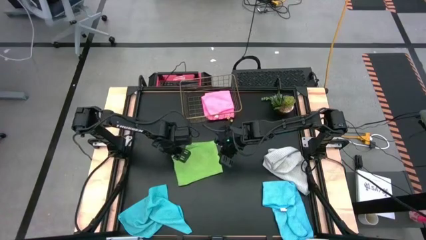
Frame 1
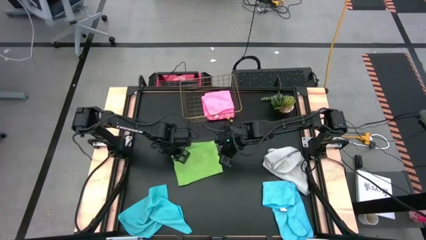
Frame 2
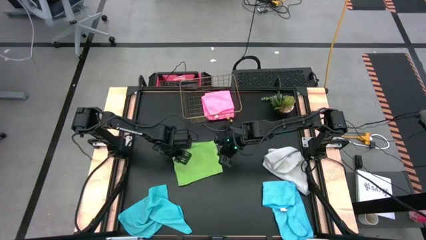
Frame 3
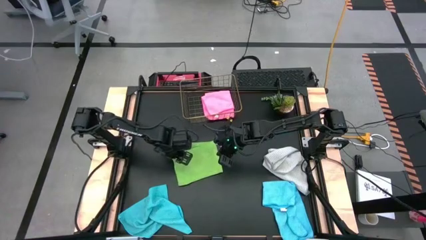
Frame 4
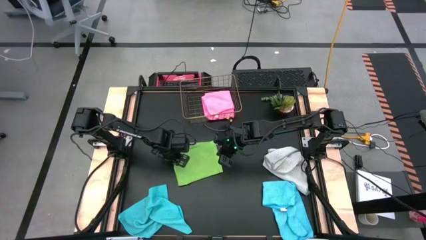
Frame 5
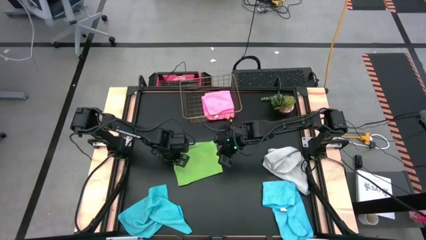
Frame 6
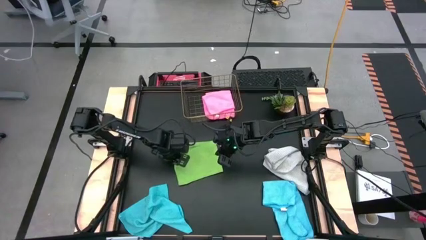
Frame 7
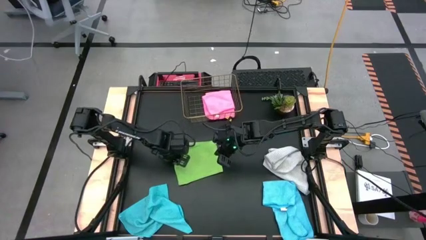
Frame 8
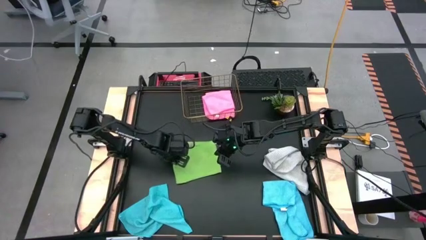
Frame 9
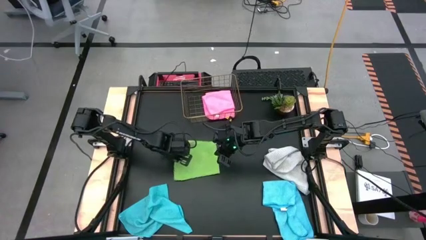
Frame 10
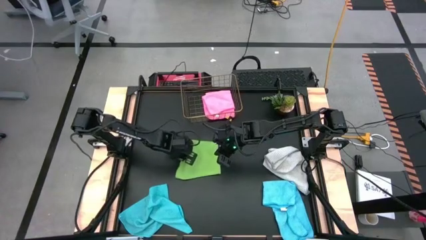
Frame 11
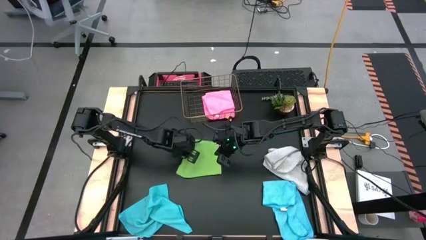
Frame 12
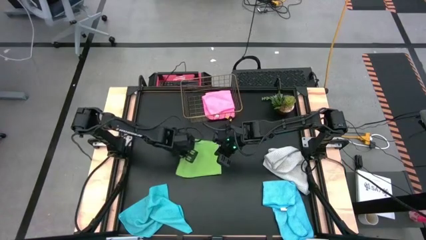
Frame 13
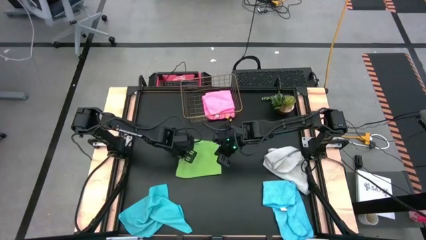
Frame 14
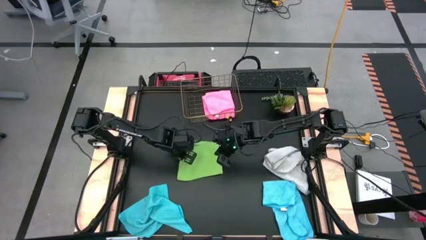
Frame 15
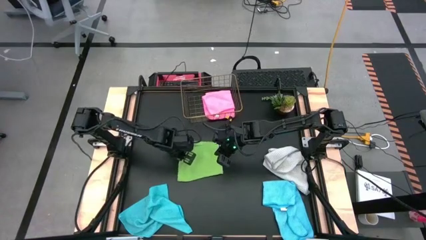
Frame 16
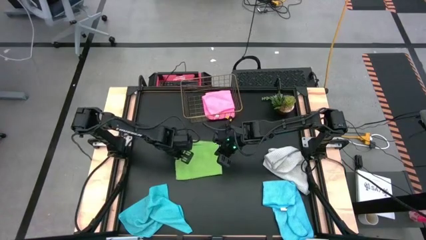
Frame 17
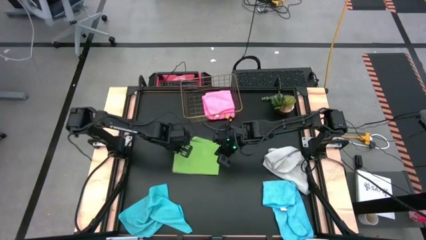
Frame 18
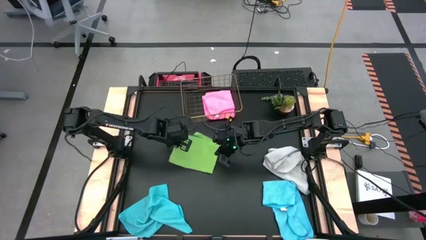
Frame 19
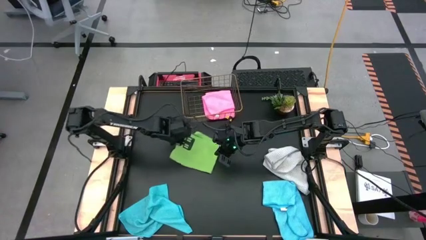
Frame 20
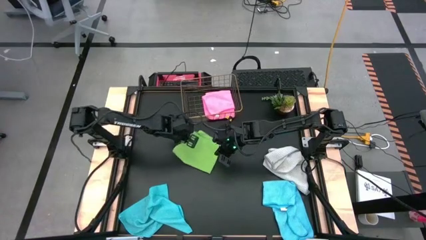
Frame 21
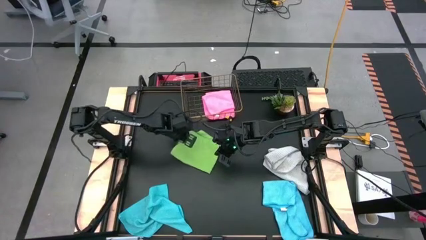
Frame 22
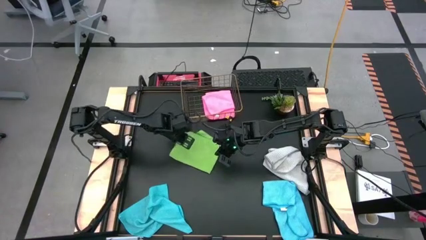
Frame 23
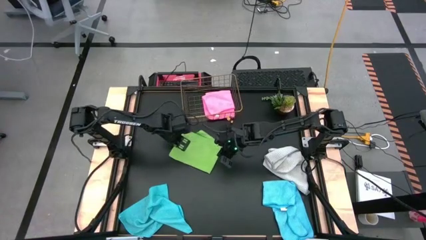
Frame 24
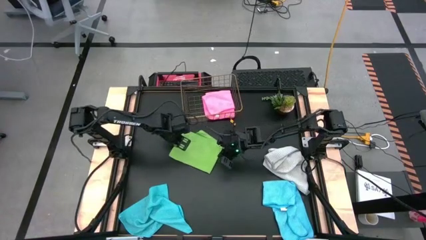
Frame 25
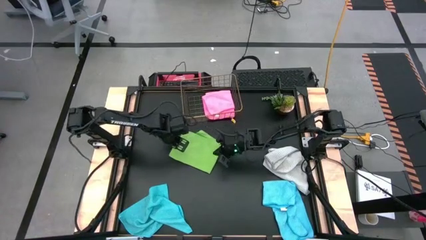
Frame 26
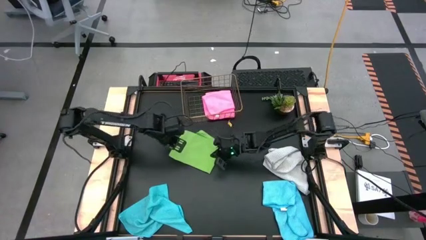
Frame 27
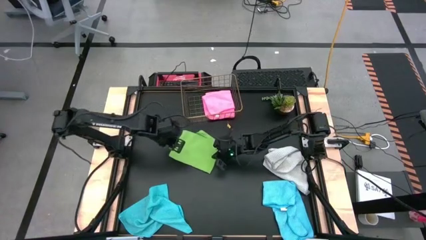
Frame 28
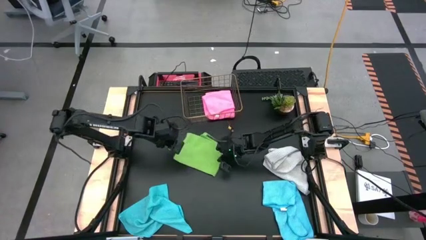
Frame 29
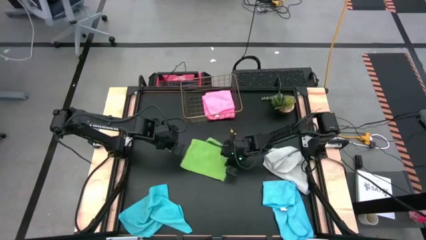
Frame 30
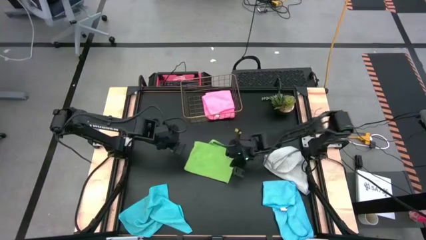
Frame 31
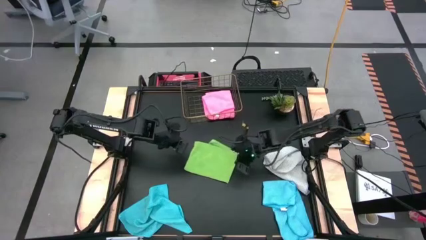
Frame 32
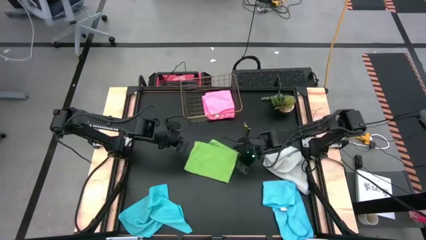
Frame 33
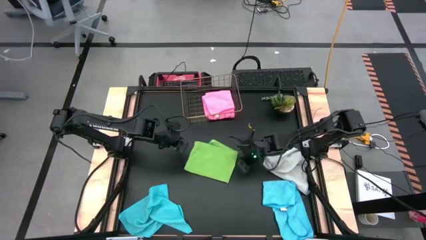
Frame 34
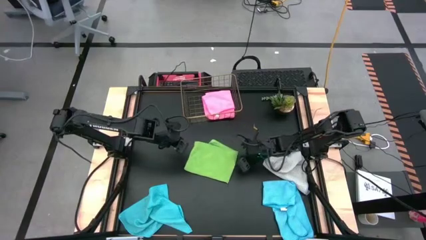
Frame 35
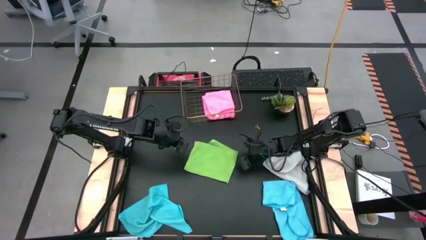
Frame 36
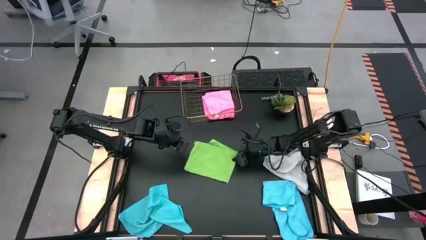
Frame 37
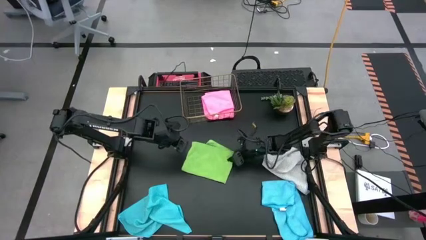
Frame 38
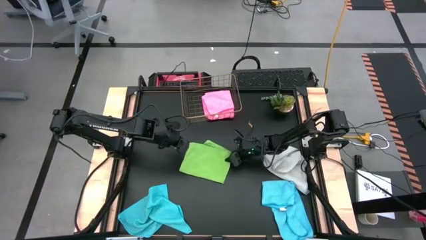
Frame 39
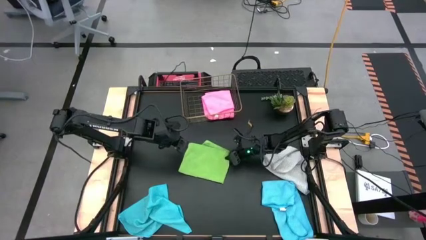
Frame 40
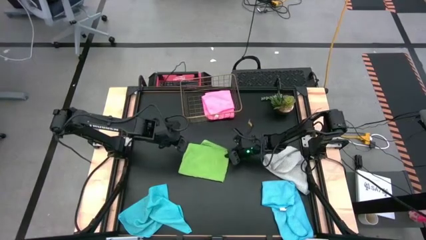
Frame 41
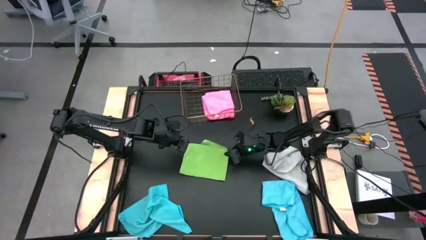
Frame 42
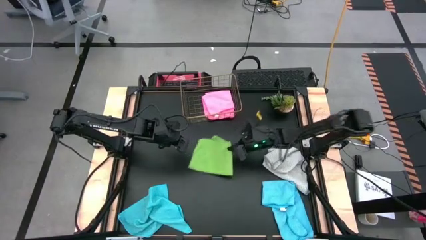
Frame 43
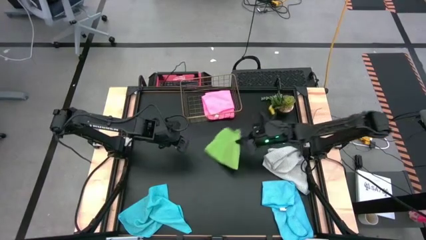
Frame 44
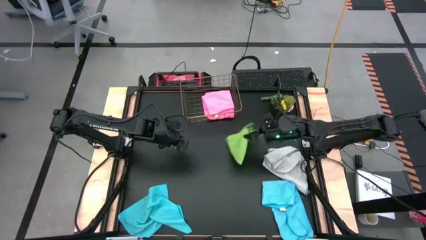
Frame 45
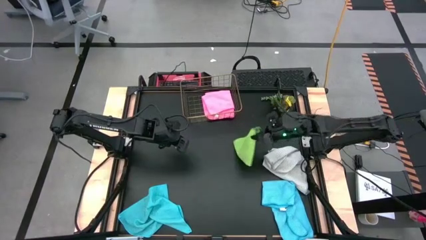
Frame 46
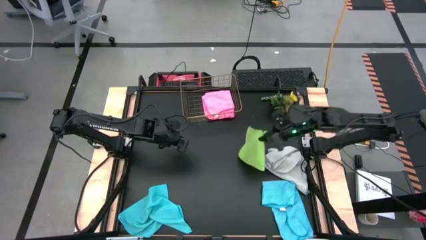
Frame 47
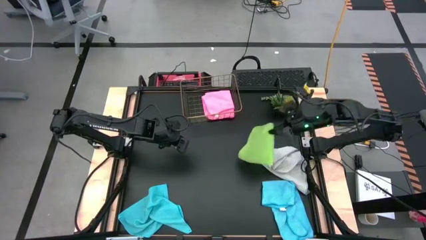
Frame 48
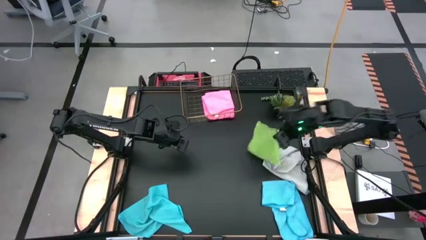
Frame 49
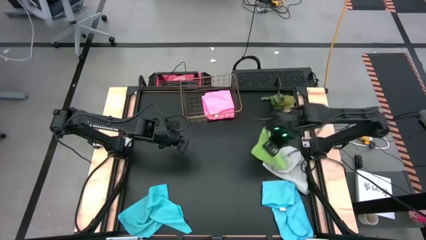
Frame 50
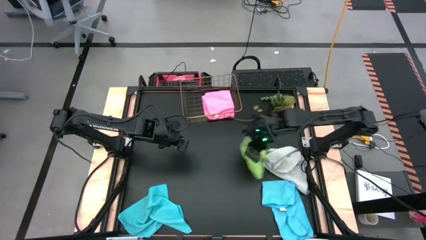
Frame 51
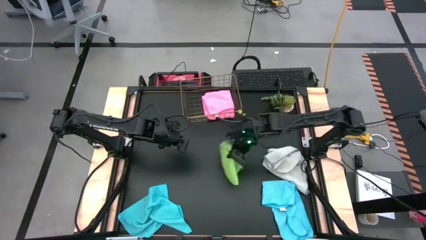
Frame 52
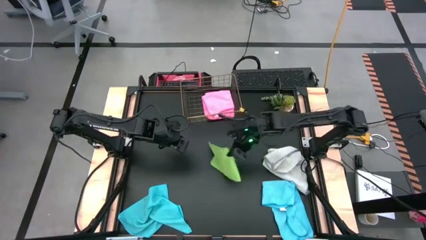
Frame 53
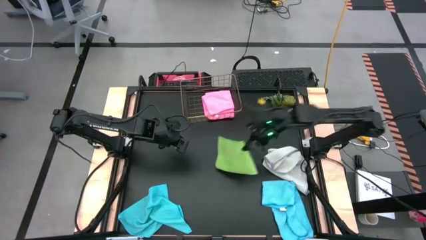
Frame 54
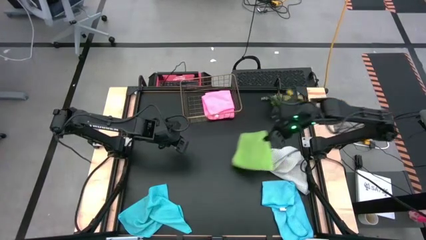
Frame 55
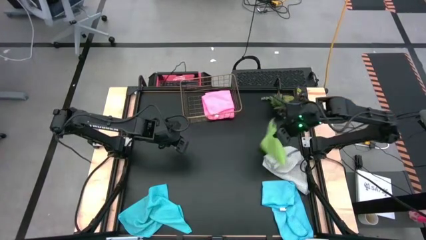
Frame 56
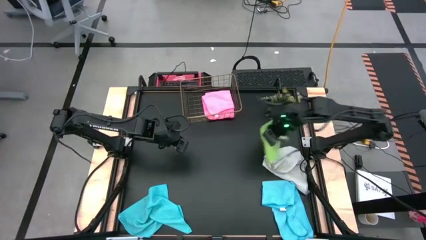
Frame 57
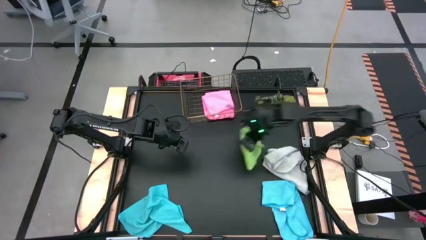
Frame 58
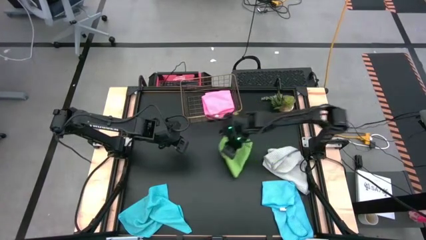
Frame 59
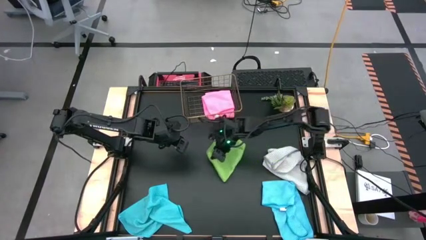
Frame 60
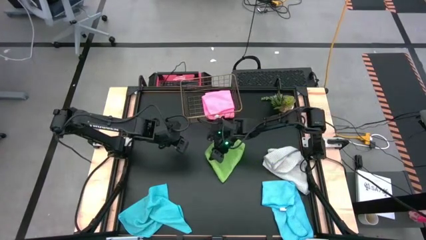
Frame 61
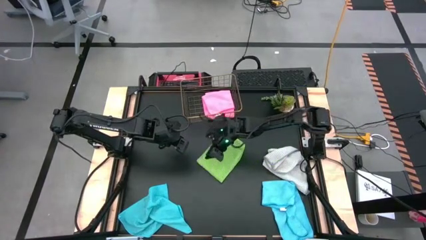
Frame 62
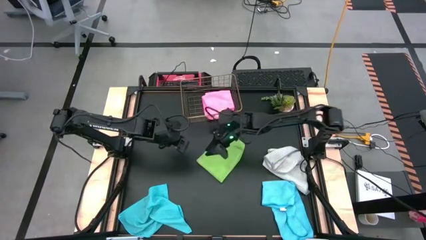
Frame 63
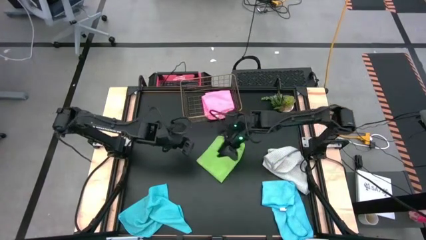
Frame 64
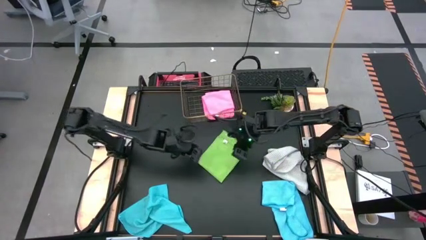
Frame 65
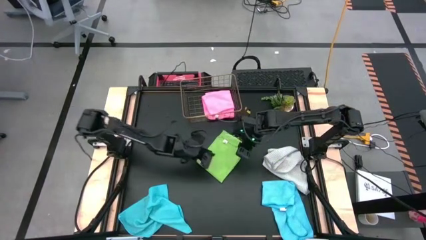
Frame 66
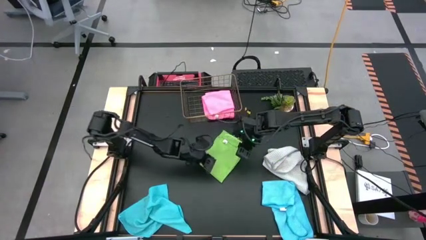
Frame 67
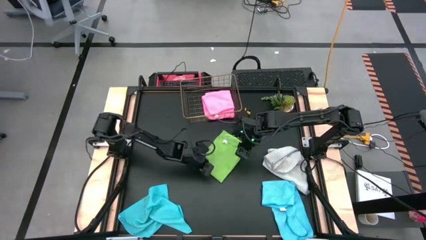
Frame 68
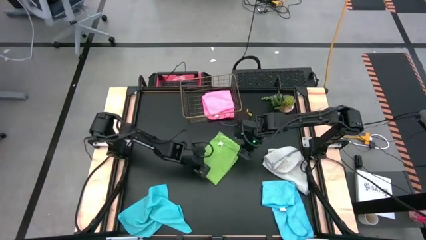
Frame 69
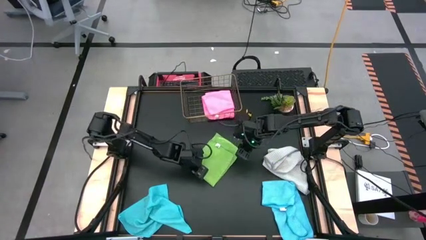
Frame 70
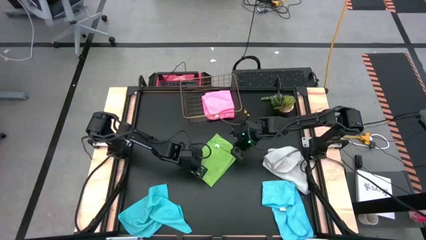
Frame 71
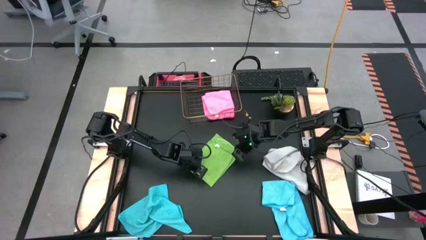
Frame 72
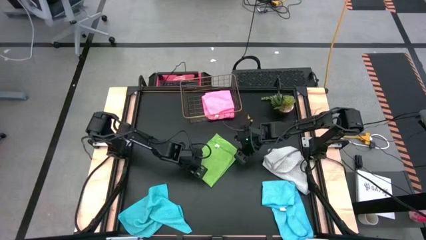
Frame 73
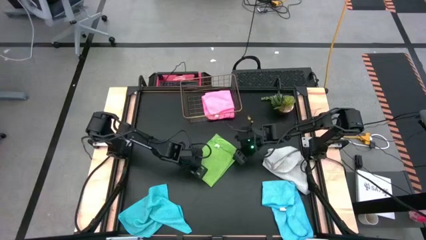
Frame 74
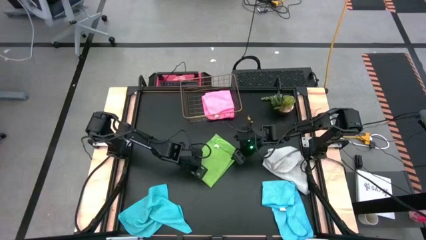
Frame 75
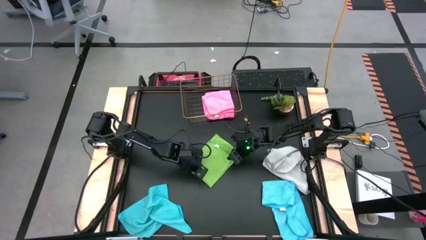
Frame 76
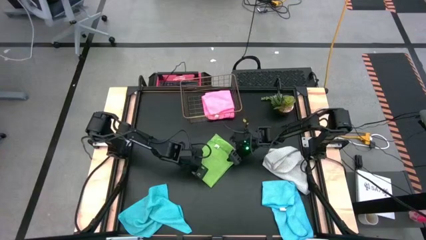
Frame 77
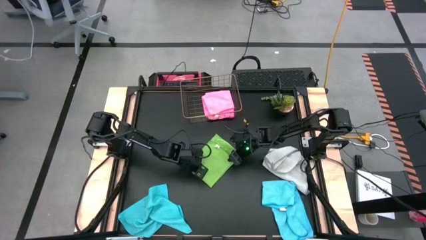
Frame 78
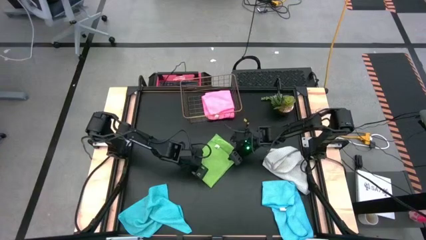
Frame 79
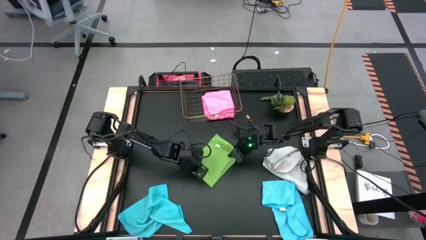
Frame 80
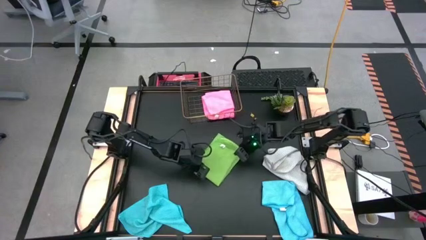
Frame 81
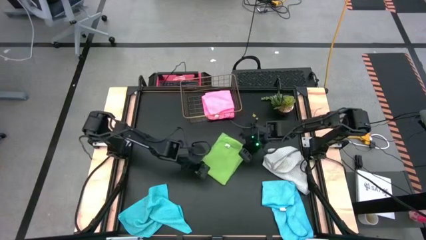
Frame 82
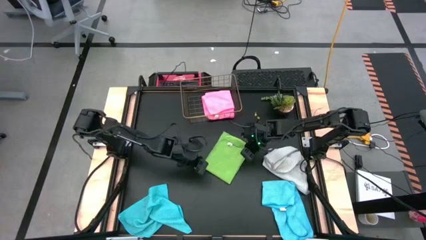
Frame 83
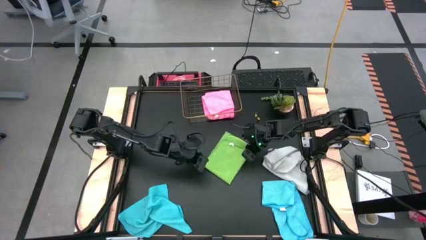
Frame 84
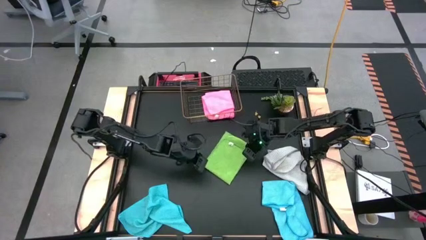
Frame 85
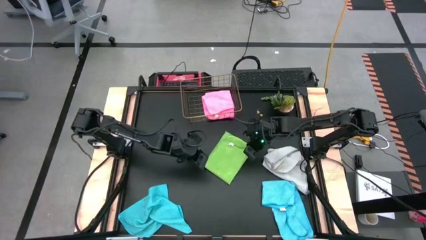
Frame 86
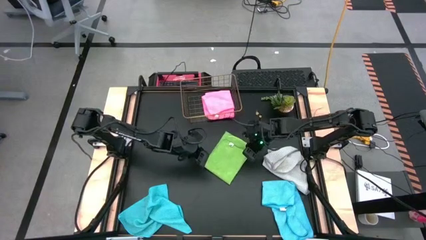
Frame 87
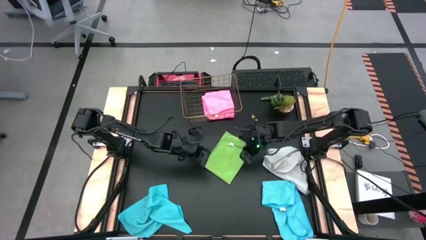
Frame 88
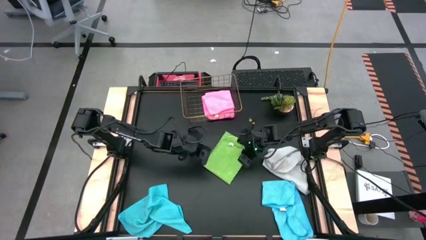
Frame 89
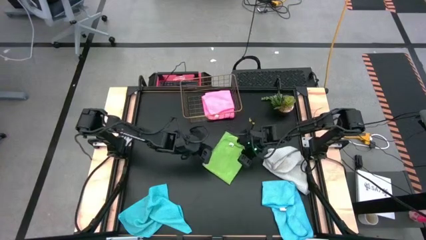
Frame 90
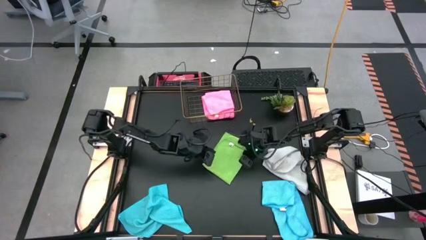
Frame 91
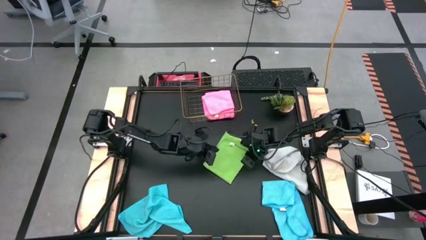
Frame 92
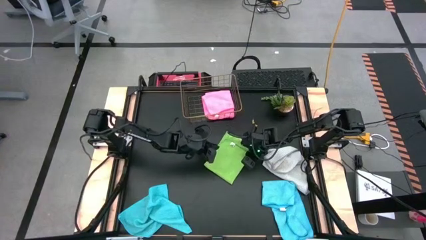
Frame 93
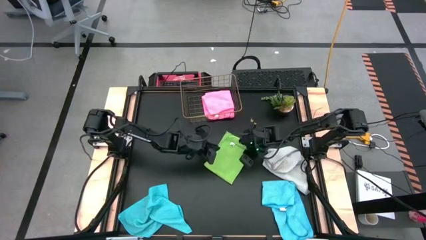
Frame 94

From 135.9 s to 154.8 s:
Task: Fold microfiber towels
Fold the green microfiber cloth in quarters
